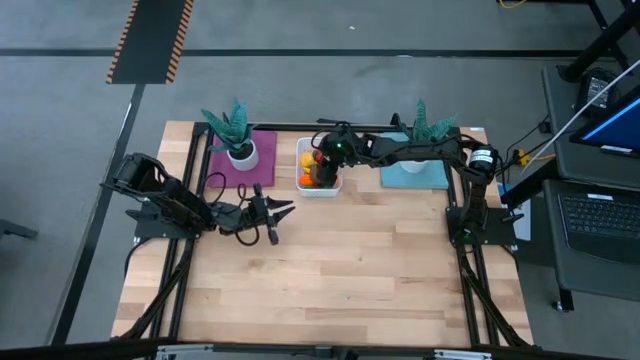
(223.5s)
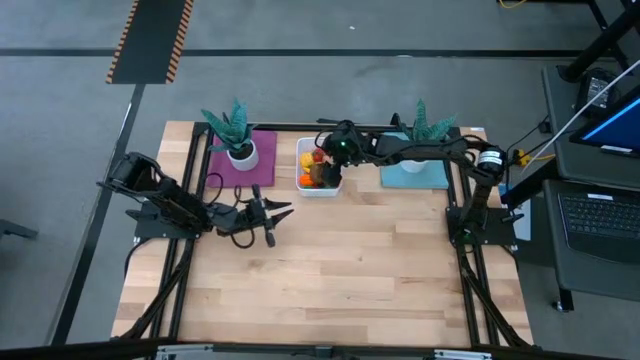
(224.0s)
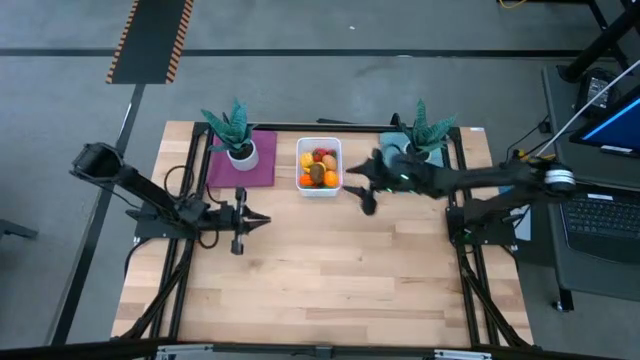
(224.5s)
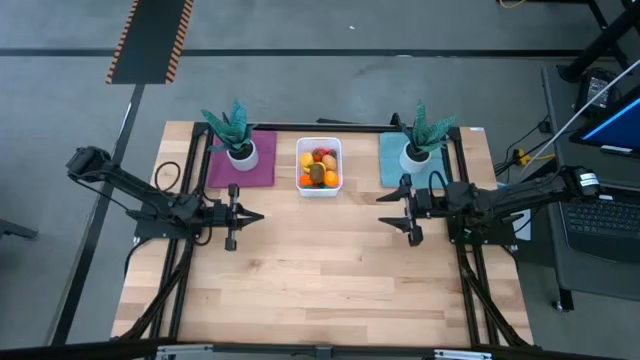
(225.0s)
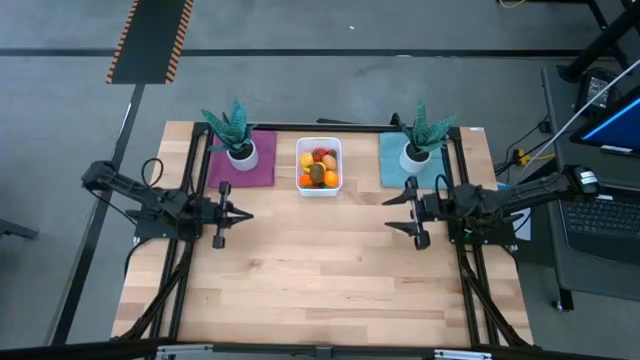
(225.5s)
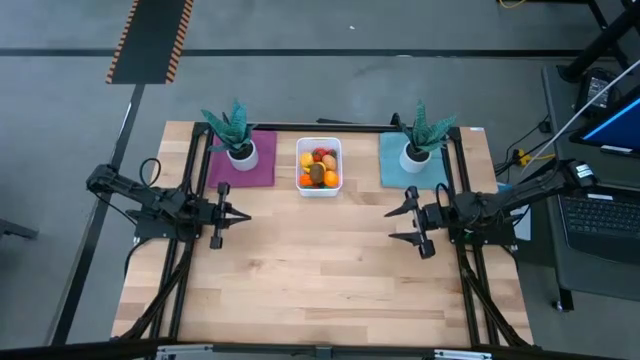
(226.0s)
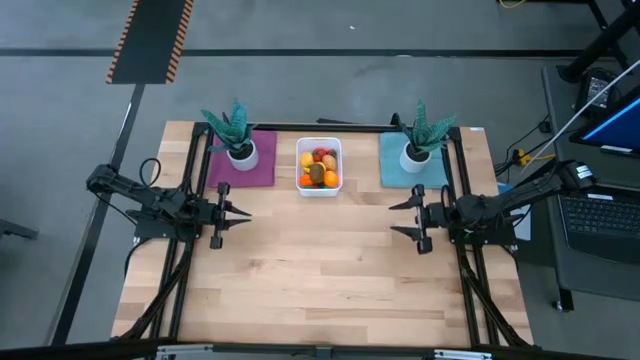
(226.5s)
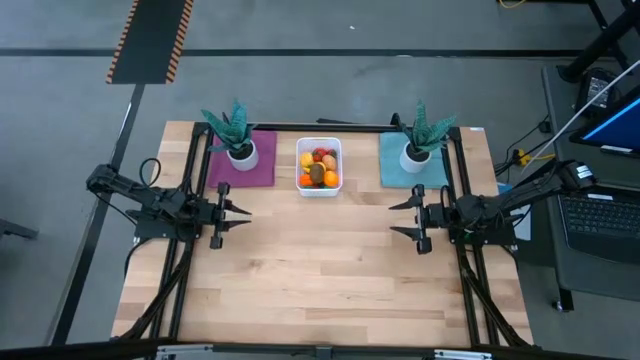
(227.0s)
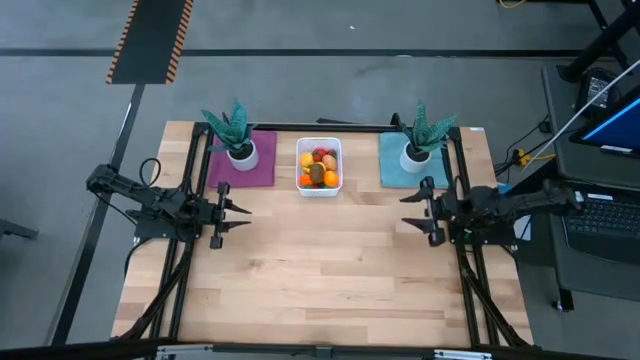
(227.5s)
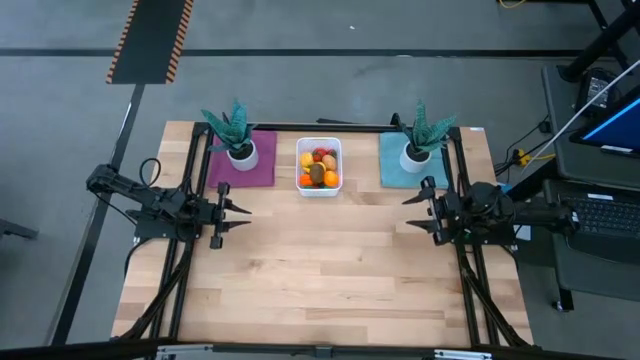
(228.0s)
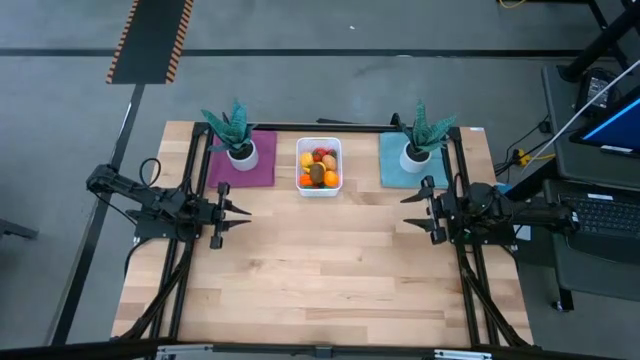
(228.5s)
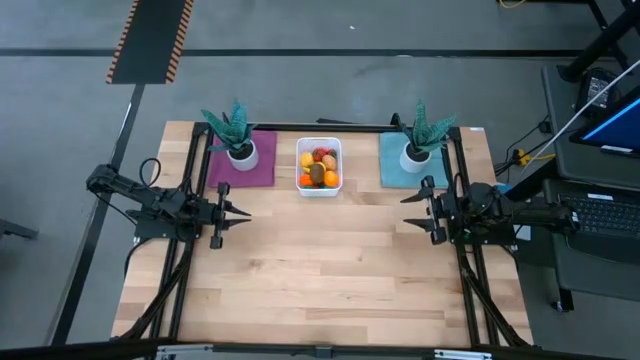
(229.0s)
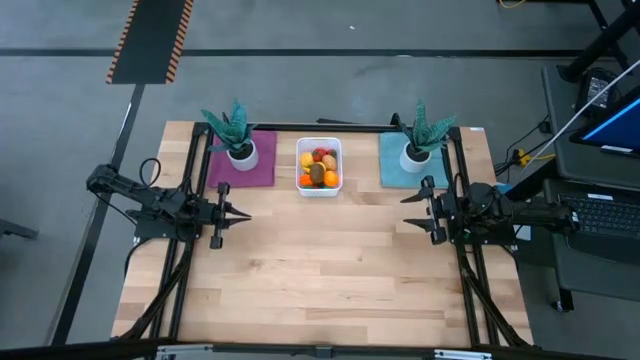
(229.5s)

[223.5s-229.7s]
Task: Pick and placing Produce into tupperware
Return to Home Position

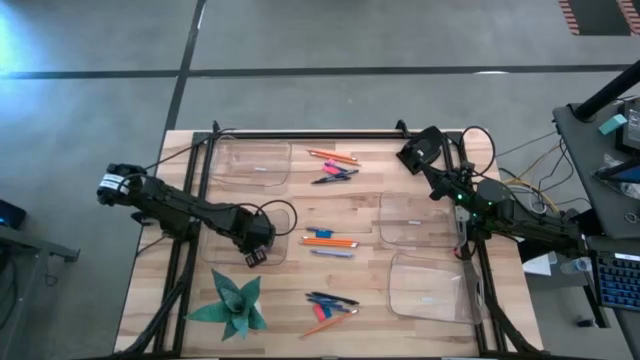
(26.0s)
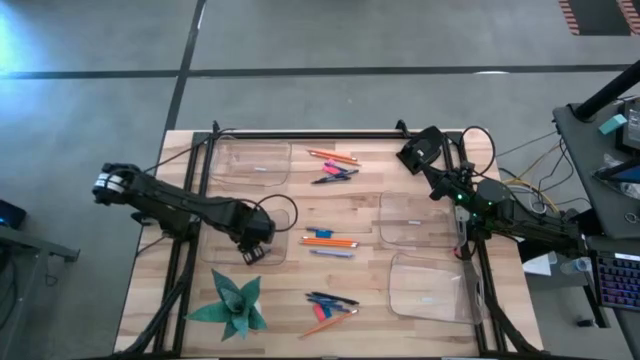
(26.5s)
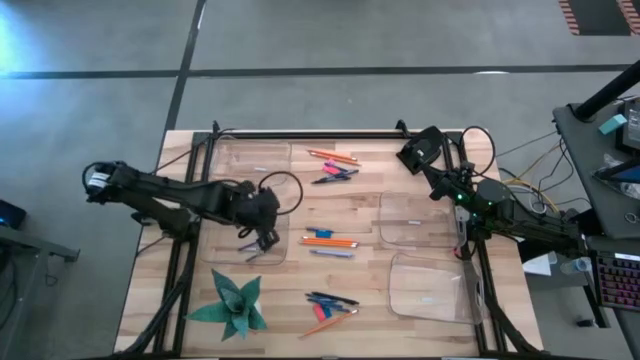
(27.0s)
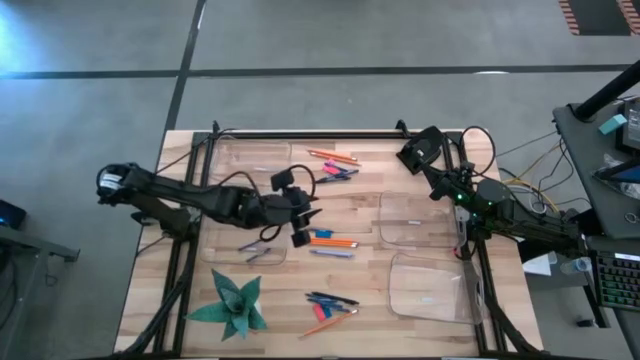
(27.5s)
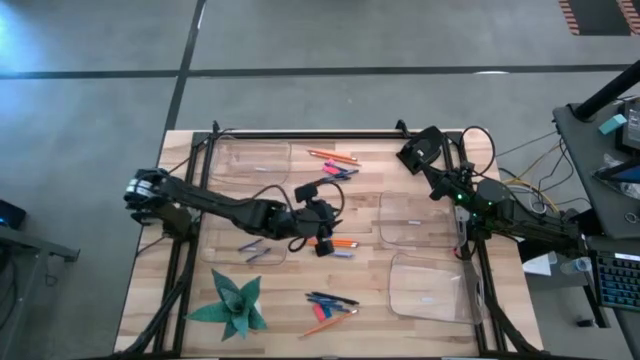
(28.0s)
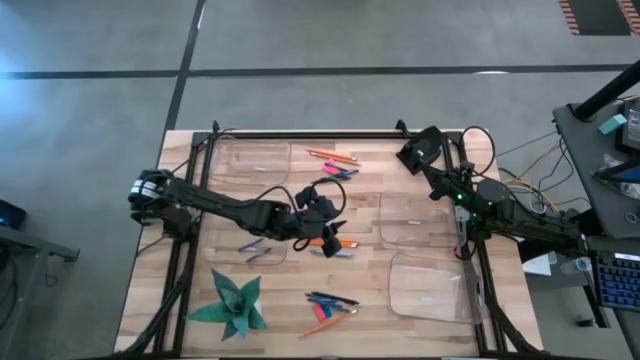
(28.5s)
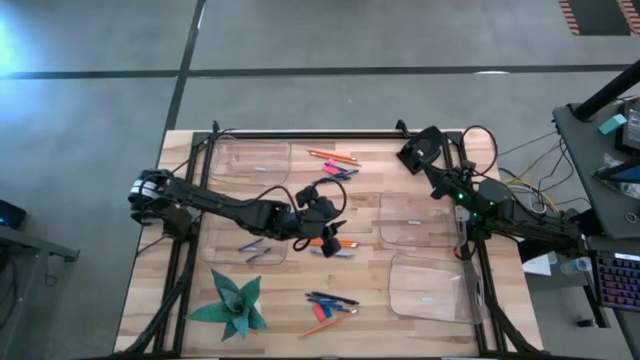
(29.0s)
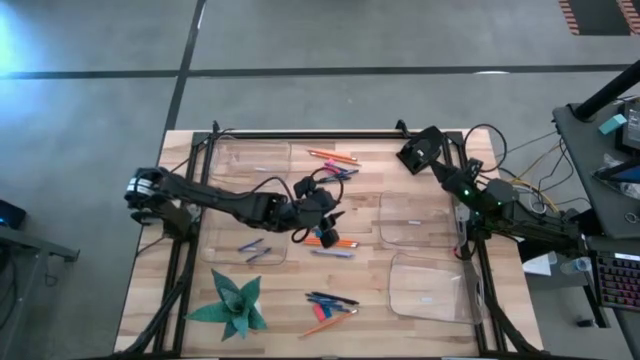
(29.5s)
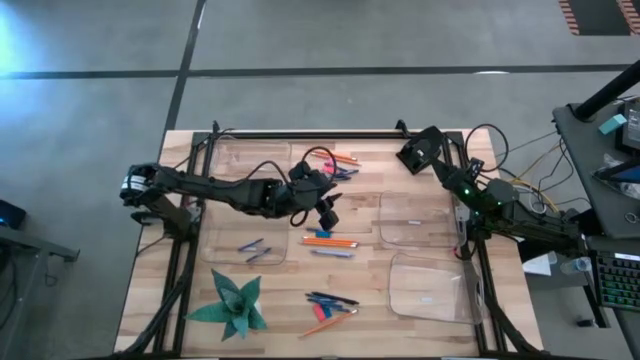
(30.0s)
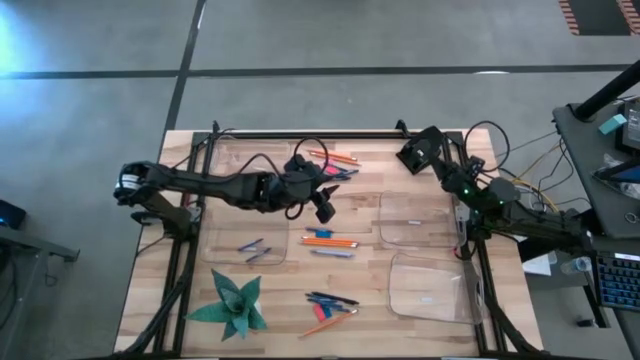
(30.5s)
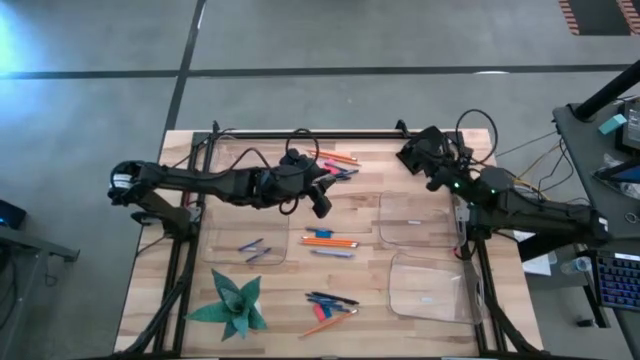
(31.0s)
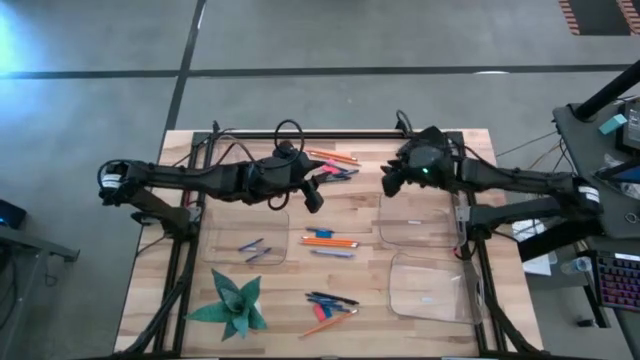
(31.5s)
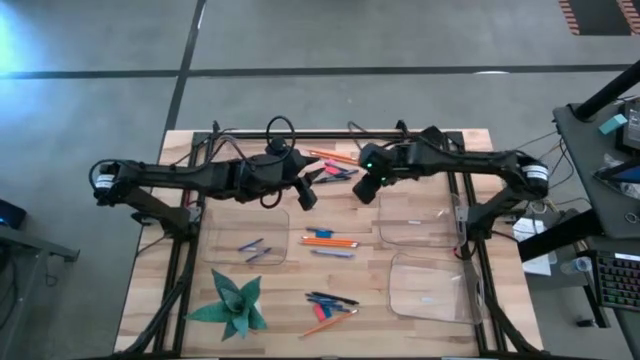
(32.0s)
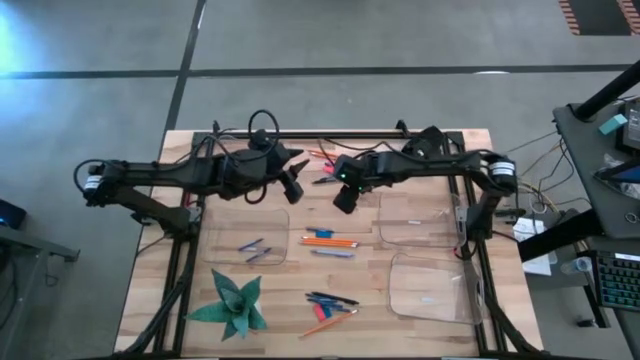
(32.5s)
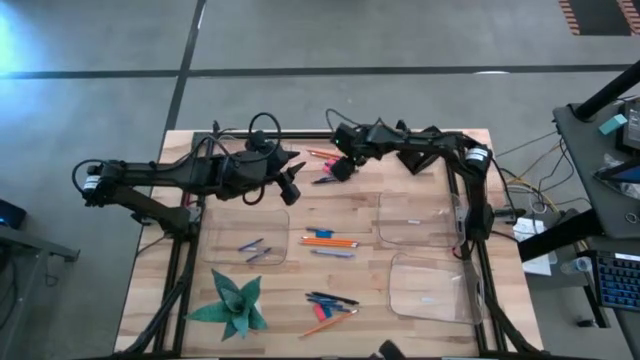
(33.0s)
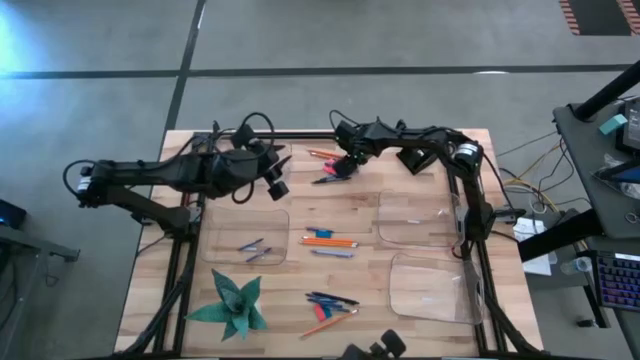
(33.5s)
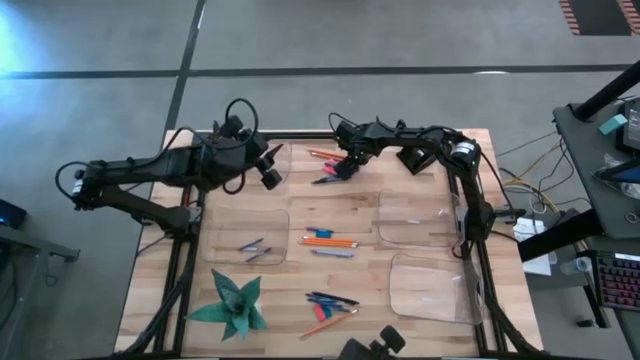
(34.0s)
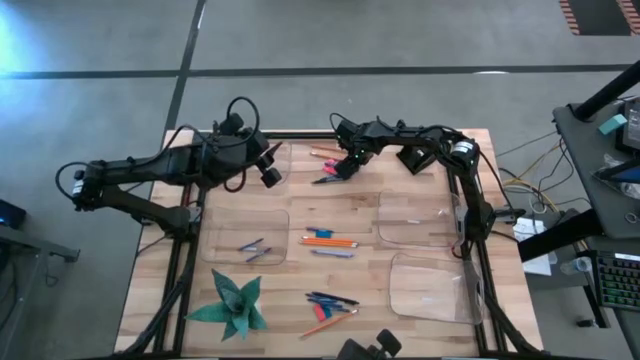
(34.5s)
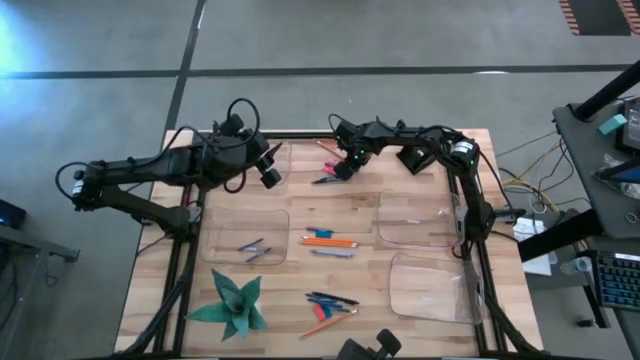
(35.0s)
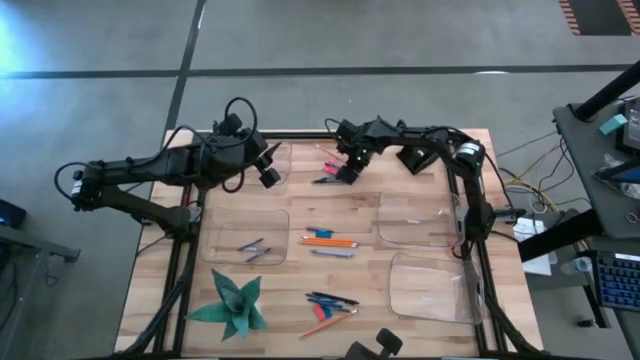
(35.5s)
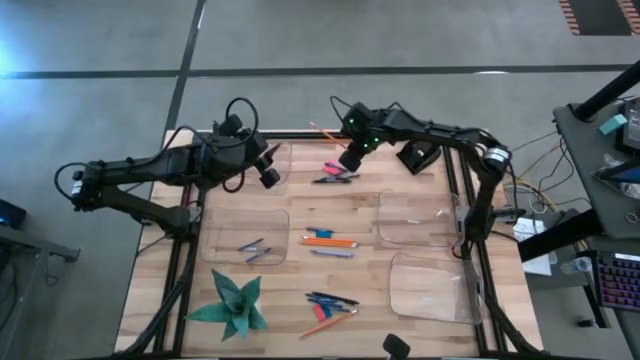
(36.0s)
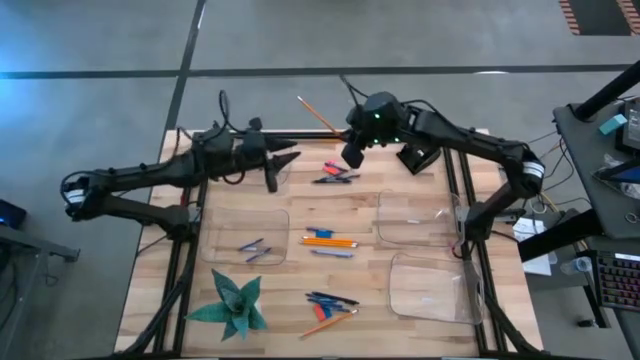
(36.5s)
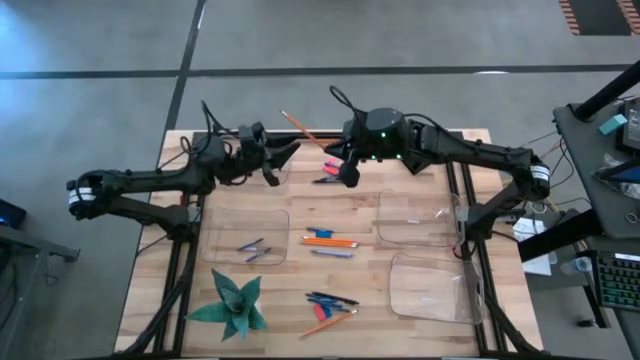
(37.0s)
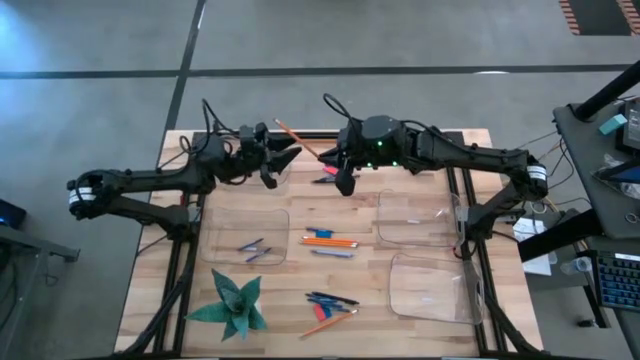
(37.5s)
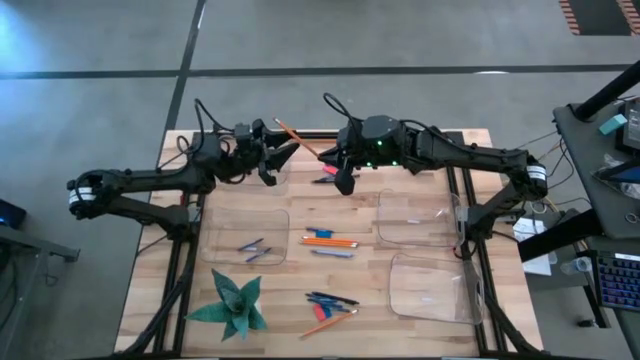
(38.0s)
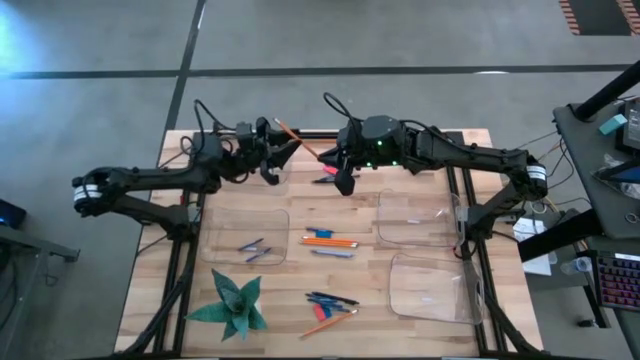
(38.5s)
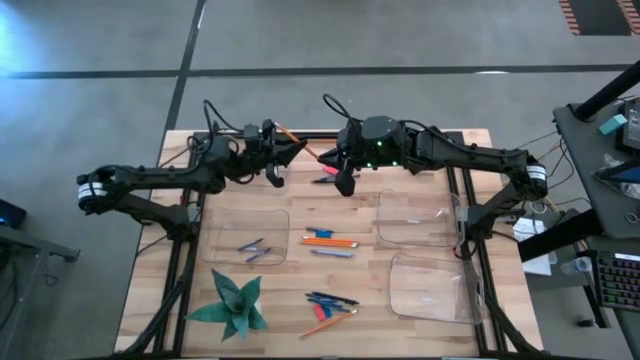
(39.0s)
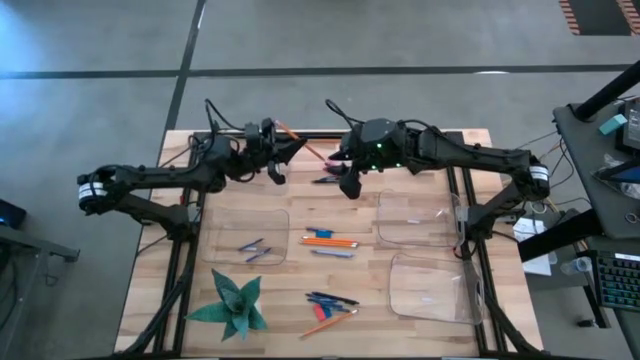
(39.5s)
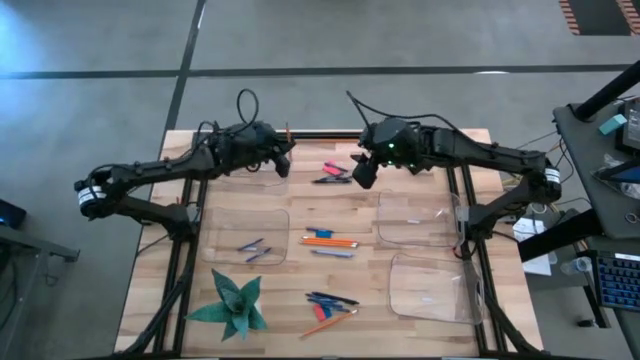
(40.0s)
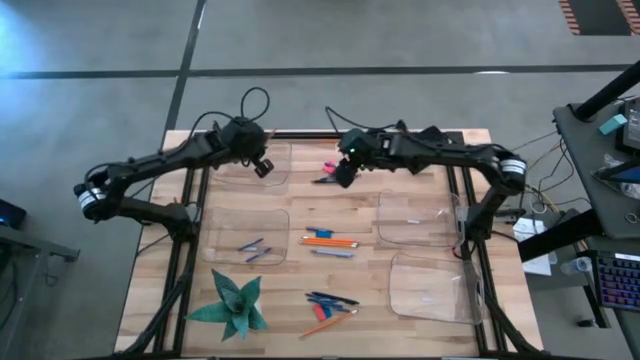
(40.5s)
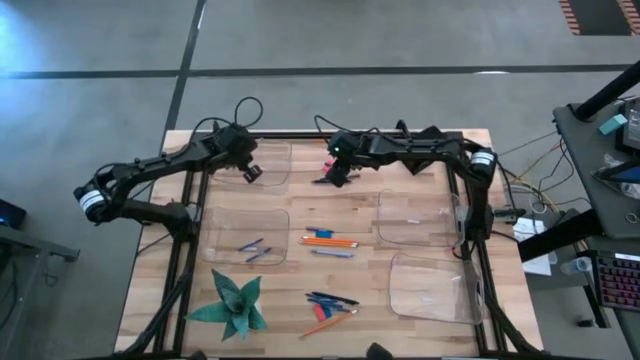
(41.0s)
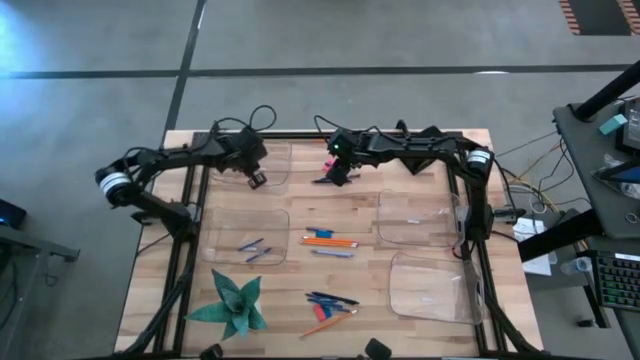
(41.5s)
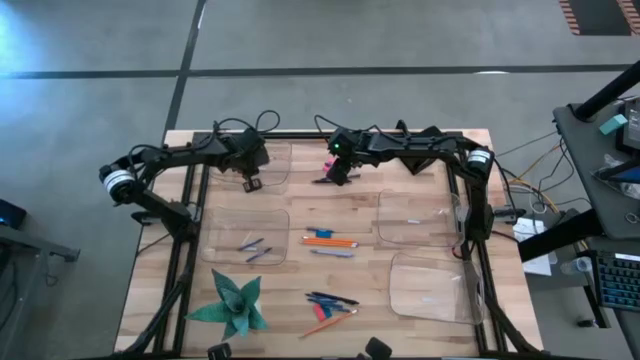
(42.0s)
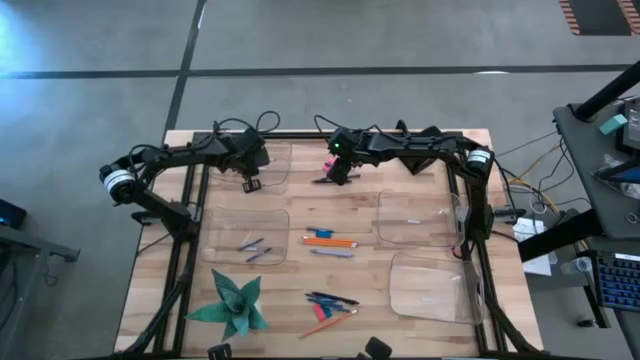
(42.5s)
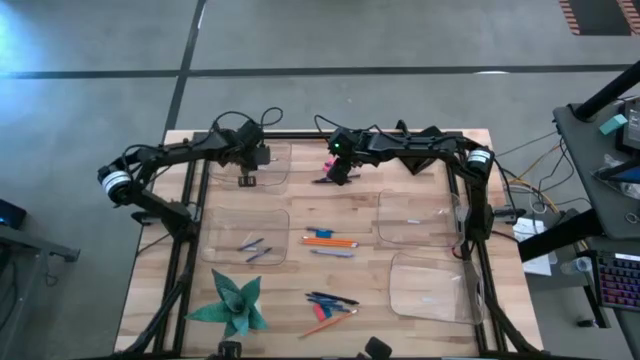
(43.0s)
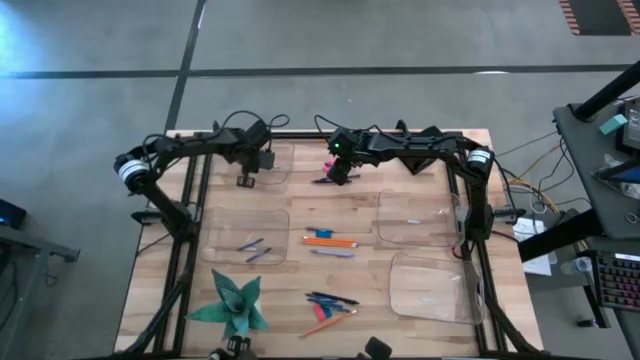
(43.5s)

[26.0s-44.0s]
Task: Sort crayons/erasers/pens/pencils in bins
Put the pencil into the top left transparent bin
